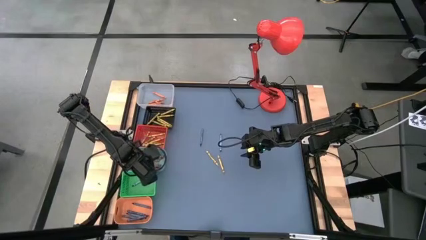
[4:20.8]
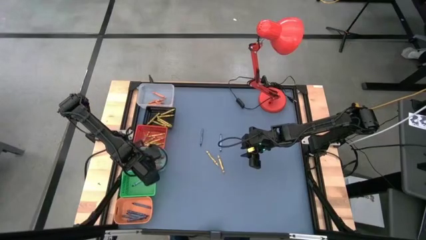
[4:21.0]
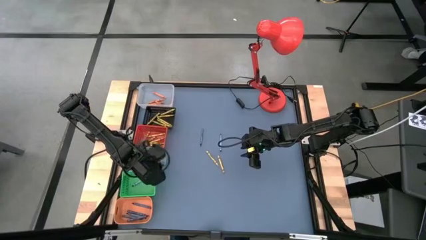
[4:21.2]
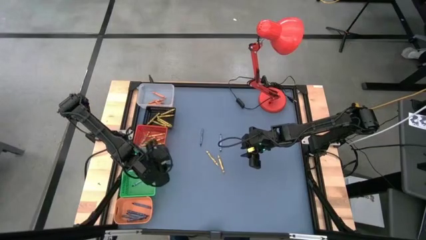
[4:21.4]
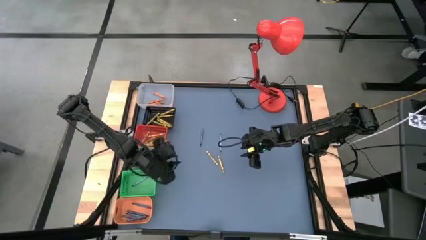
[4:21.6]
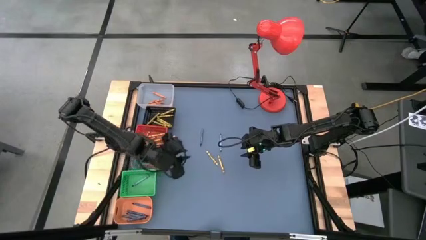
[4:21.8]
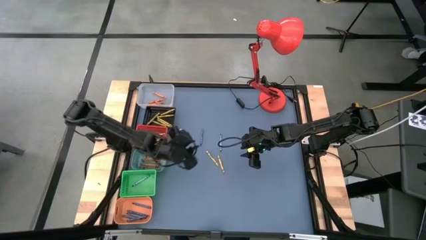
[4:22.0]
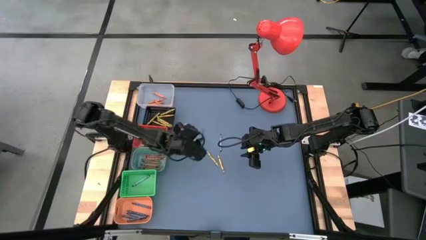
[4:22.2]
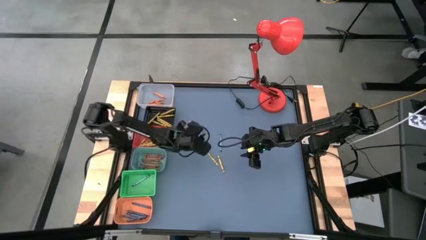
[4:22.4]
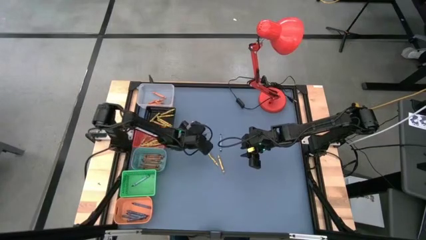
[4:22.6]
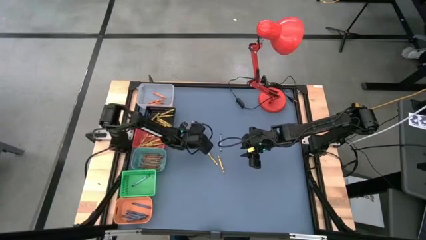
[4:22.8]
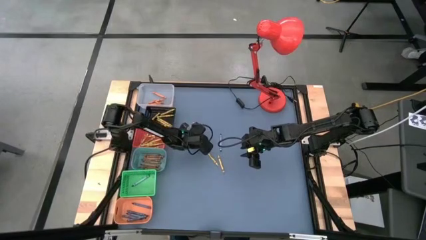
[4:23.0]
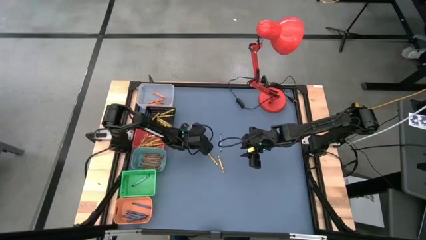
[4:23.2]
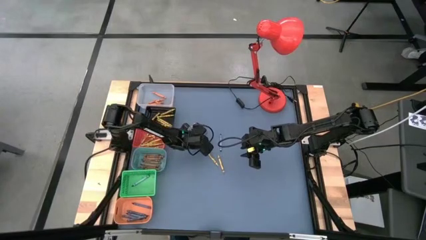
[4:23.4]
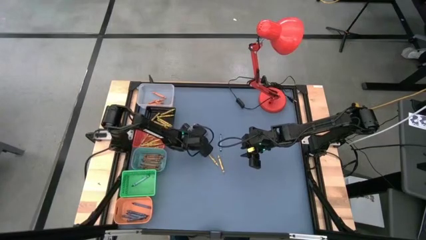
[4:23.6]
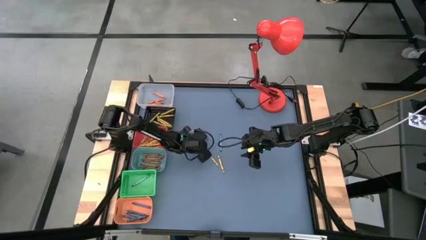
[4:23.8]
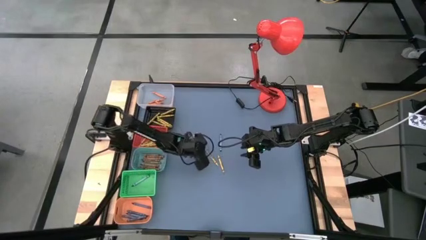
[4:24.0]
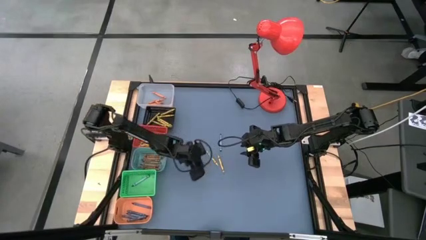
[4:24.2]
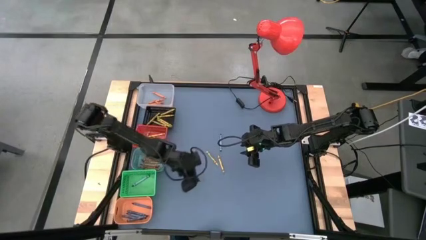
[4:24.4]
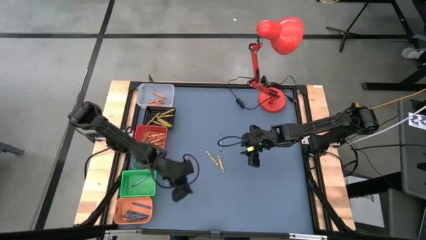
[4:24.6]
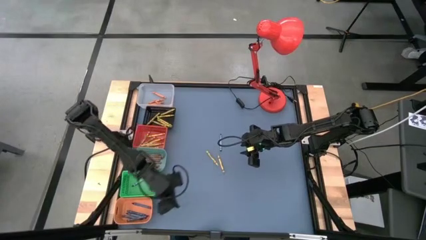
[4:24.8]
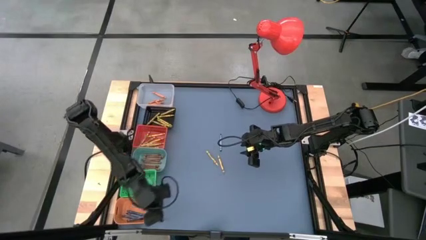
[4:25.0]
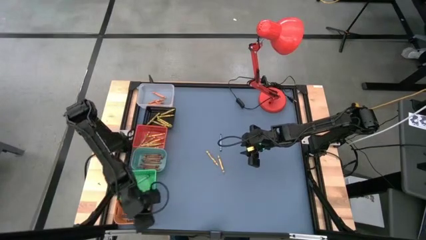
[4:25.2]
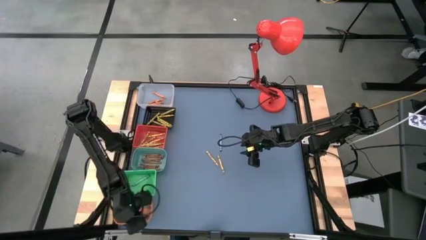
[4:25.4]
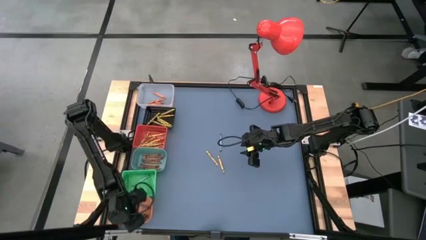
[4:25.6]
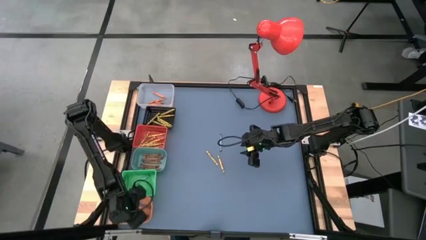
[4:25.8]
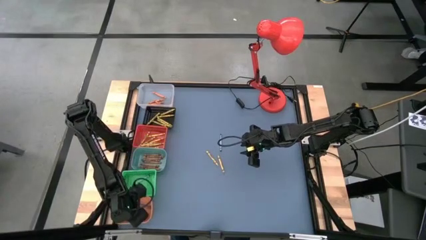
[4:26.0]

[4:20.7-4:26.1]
Task: Sort crayons
Put the violet crayon into the light orange bin

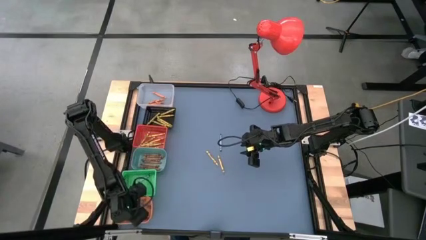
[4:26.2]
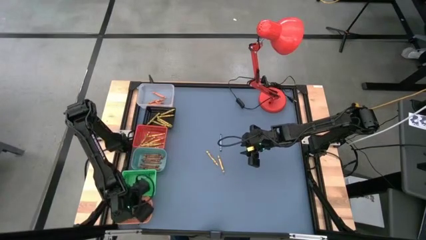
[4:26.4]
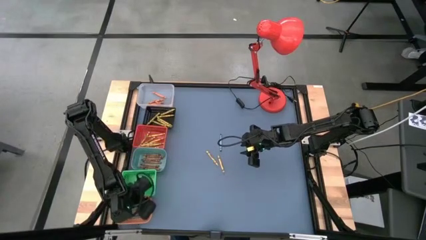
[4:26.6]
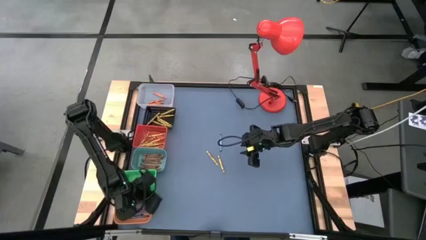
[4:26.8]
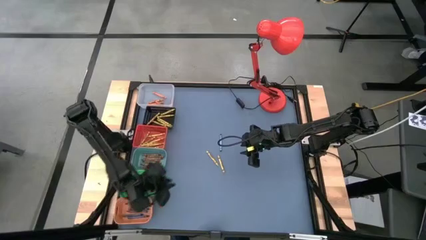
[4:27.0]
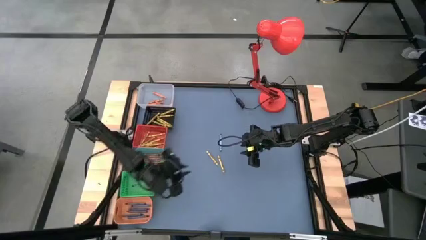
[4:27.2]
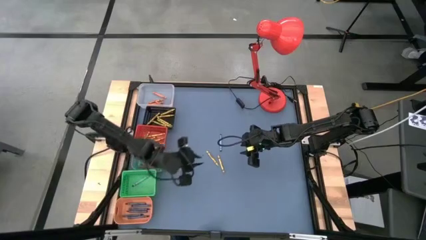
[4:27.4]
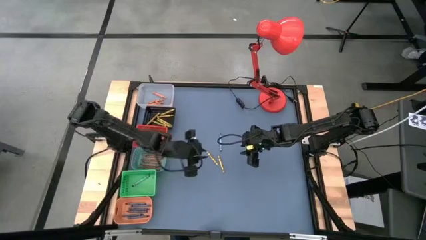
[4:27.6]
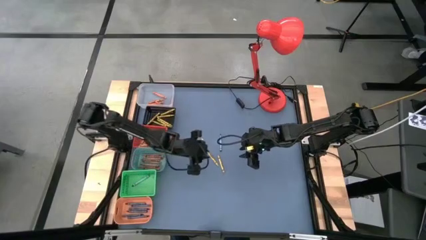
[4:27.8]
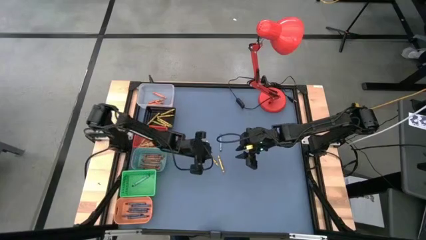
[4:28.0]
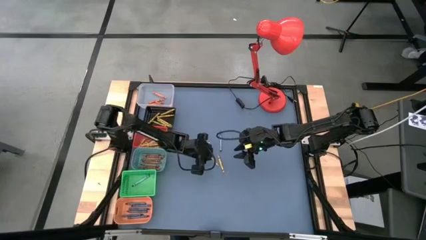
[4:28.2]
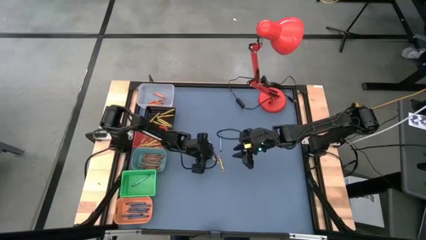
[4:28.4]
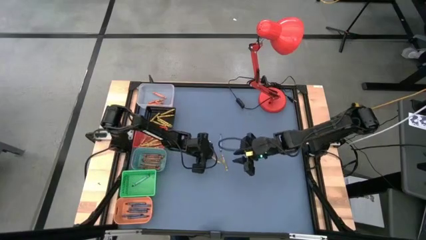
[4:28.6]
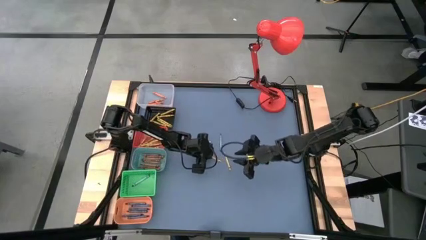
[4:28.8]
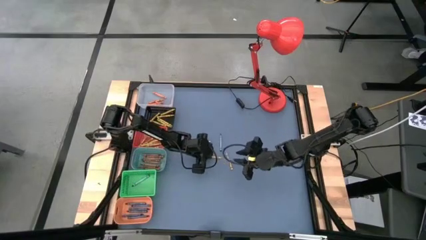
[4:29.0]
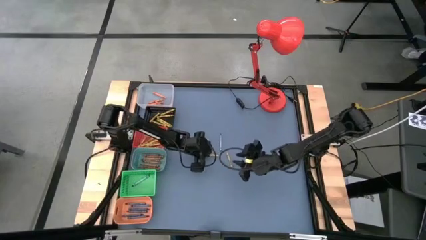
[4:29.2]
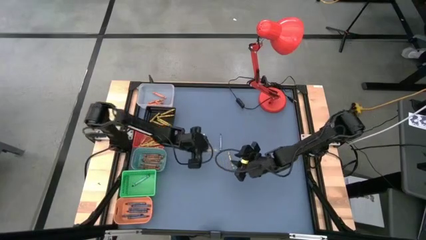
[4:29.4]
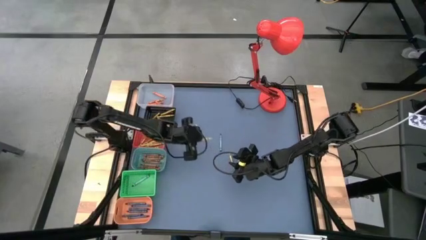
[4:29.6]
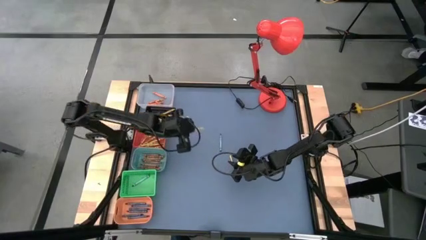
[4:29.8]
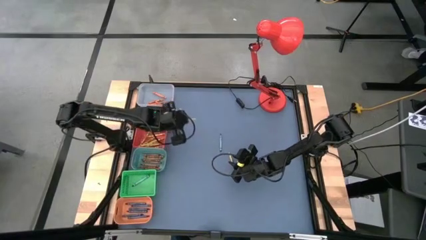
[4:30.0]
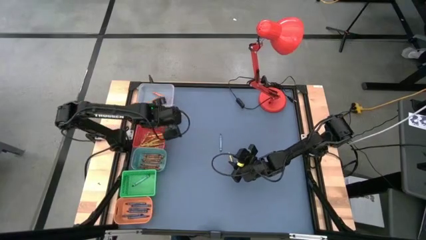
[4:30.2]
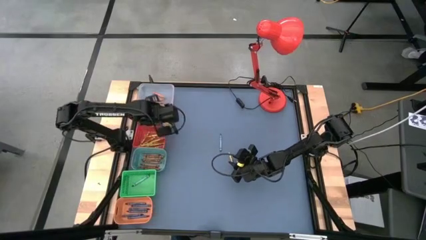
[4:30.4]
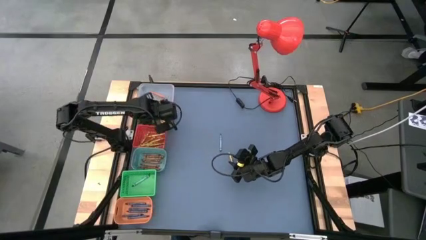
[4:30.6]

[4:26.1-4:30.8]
Put the green crayon into the black bin

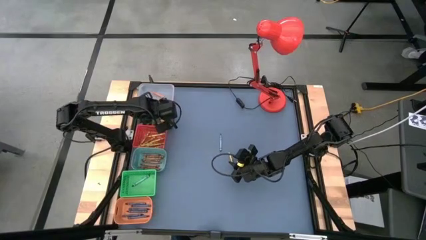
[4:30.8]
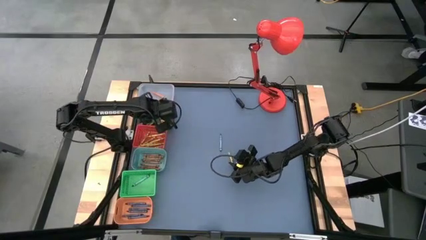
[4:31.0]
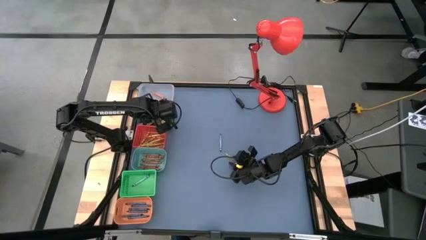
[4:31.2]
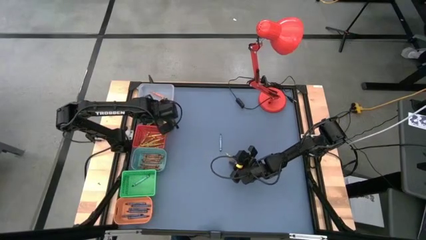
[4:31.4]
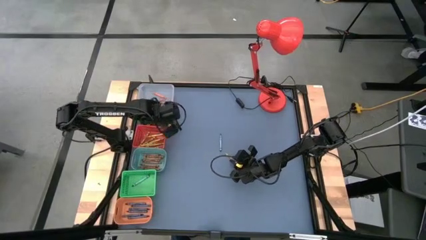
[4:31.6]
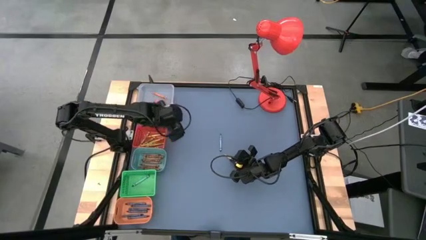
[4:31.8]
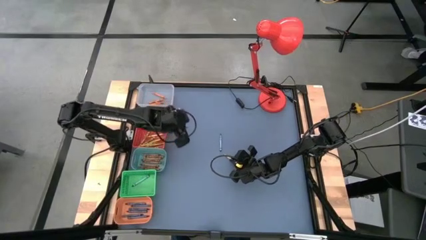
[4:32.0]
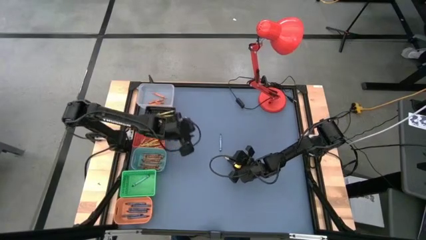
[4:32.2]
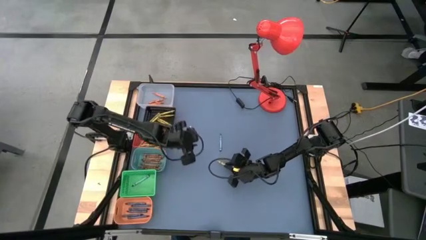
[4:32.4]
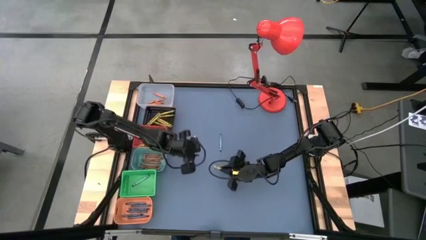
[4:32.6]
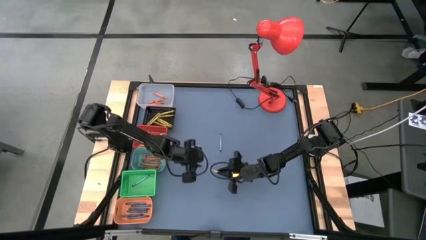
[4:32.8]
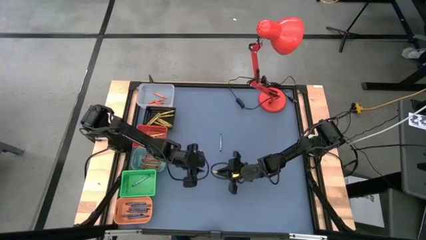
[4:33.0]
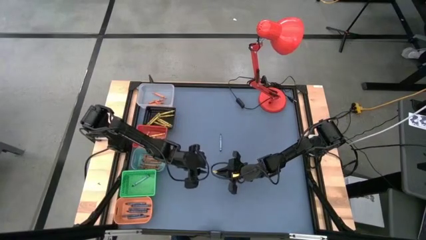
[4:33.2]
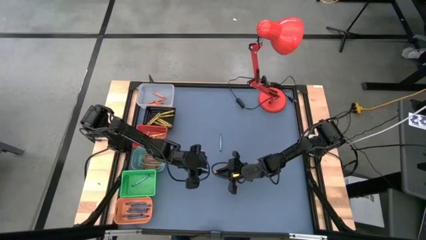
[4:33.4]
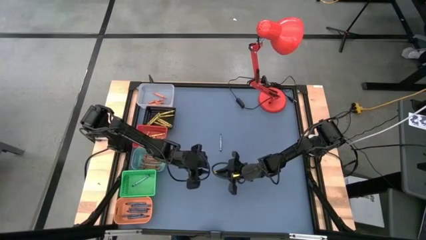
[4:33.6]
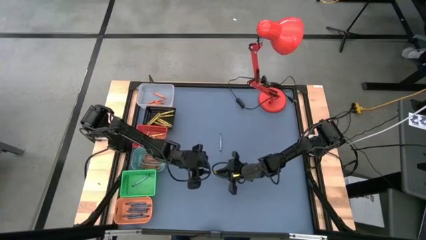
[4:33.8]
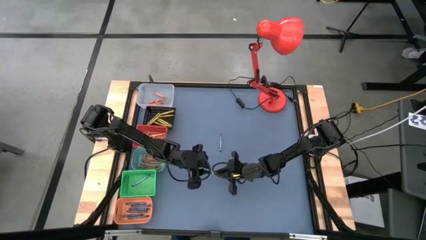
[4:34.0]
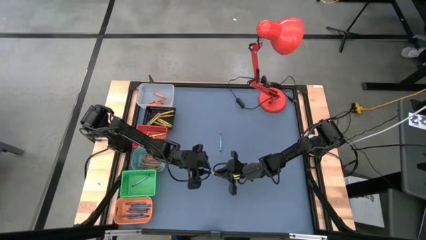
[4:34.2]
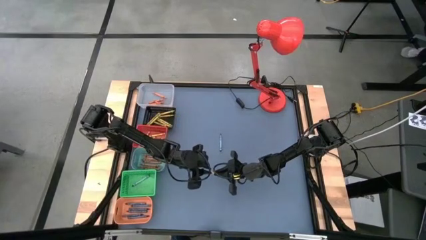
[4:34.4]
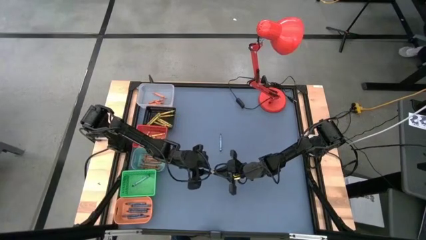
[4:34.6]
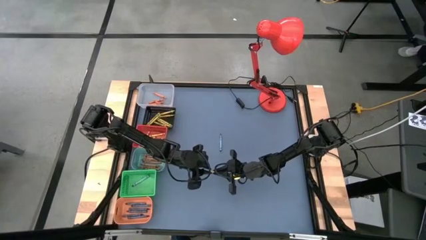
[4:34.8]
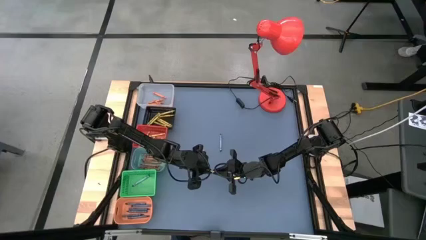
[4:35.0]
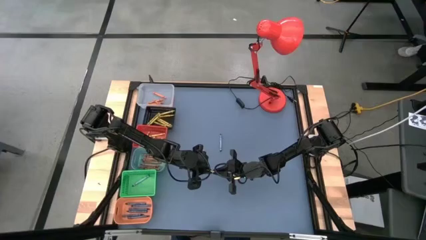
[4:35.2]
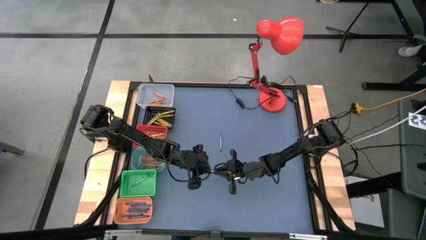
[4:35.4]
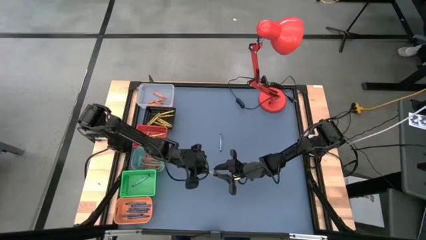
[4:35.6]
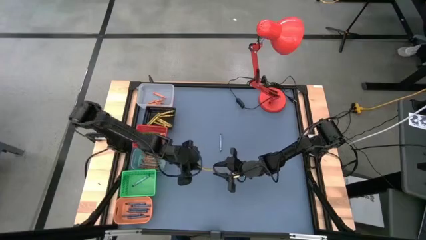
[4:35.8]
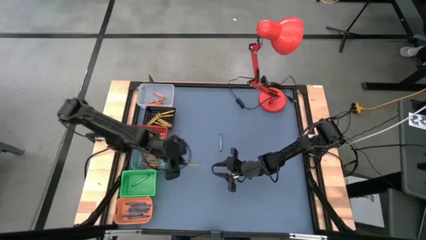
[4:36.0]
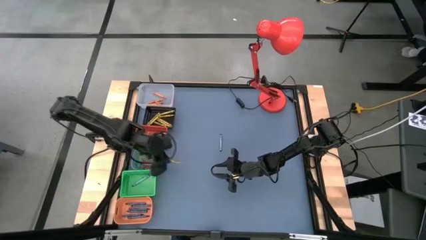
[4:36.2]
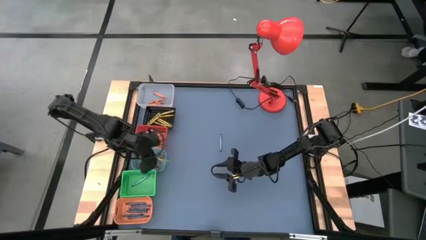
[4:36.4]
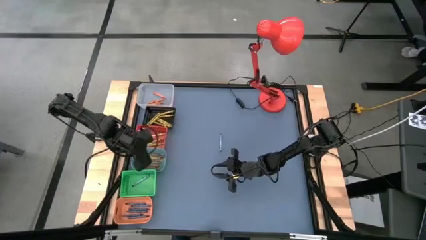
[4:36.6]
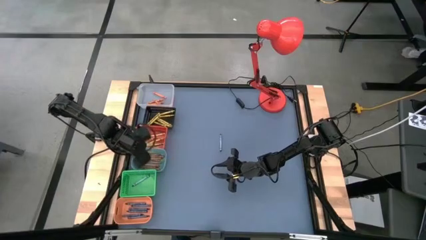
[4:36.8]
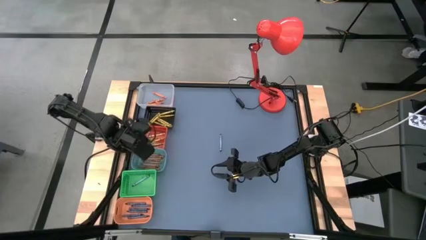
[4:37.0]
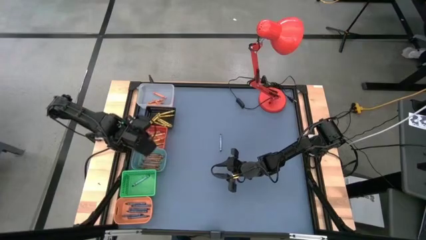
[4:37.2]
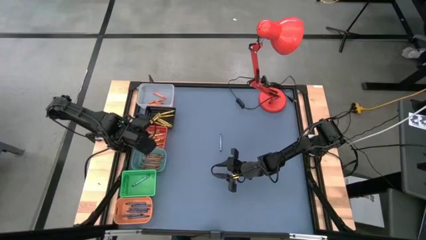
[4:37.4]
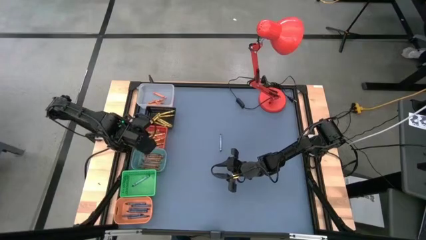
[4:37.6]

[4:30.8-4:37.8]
Put the yellow crayon into the orange bin
